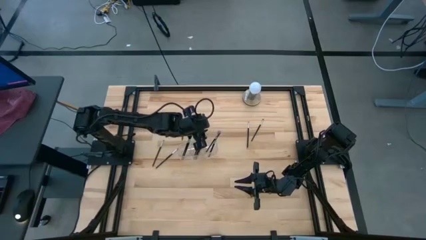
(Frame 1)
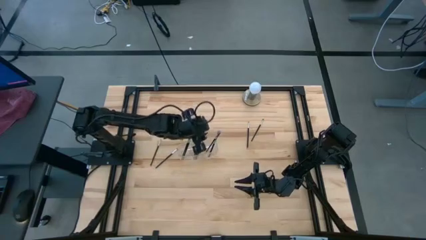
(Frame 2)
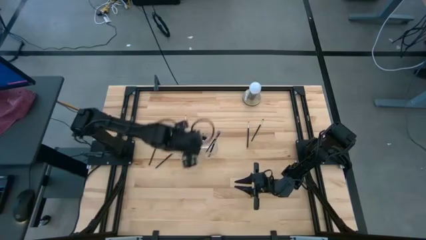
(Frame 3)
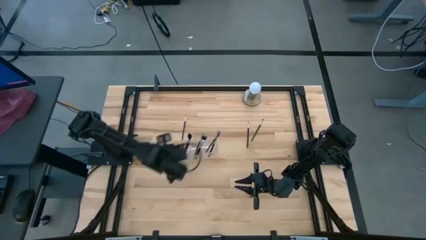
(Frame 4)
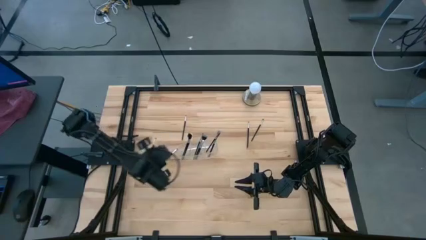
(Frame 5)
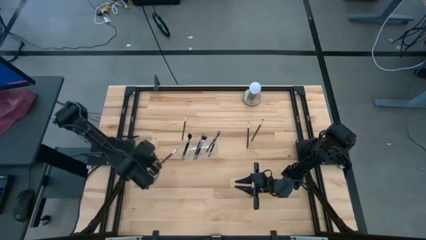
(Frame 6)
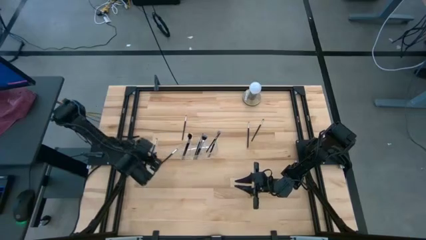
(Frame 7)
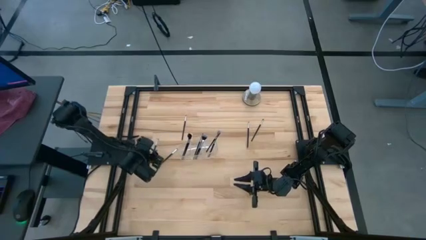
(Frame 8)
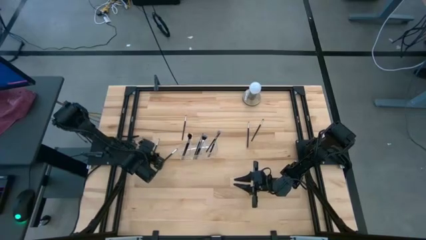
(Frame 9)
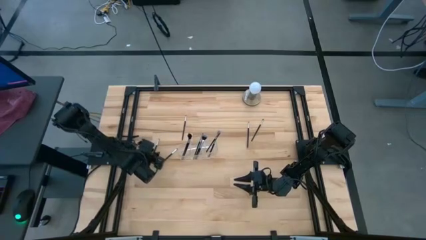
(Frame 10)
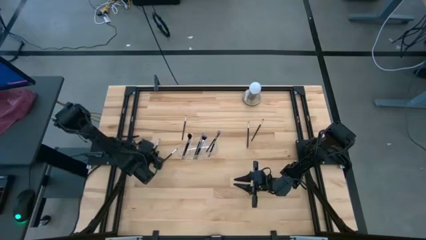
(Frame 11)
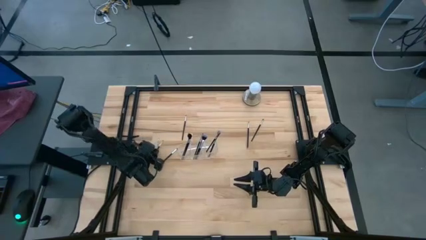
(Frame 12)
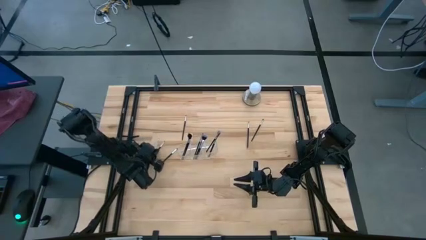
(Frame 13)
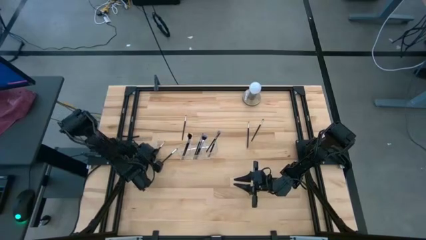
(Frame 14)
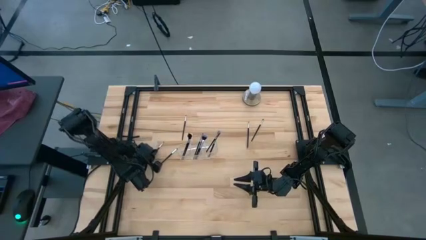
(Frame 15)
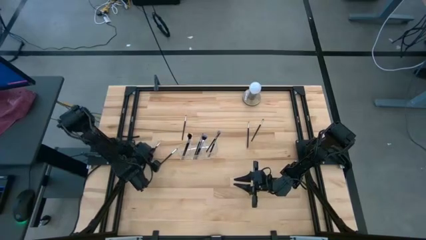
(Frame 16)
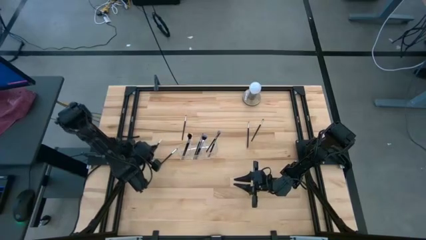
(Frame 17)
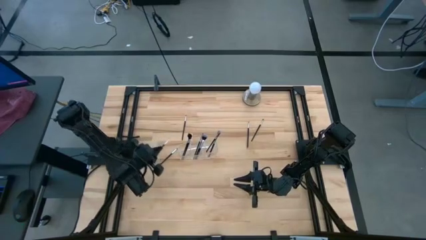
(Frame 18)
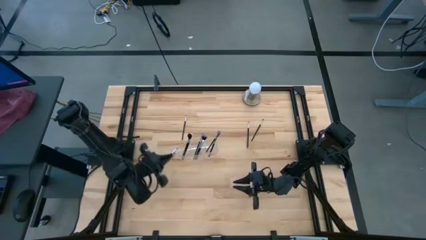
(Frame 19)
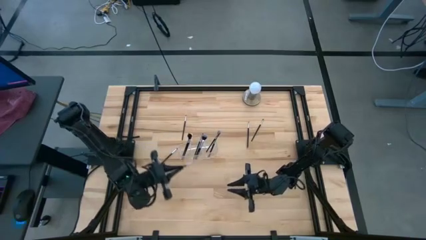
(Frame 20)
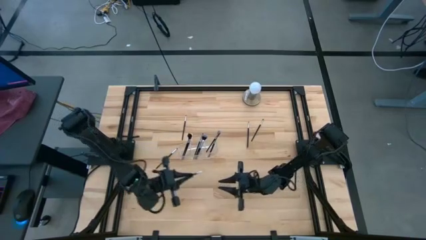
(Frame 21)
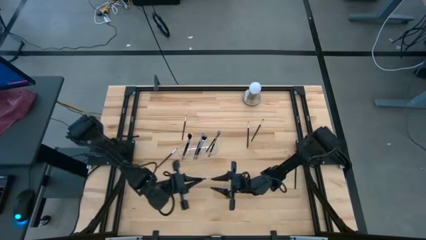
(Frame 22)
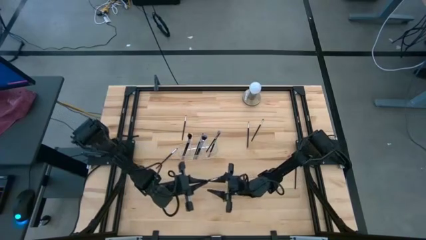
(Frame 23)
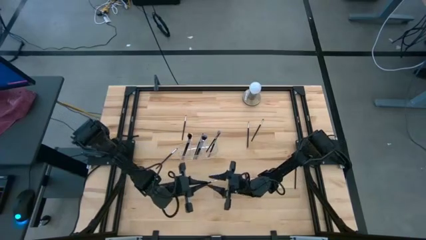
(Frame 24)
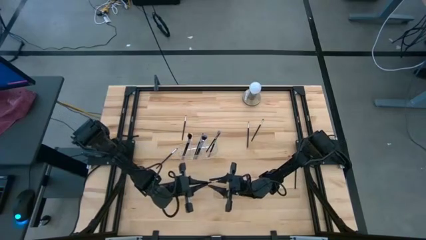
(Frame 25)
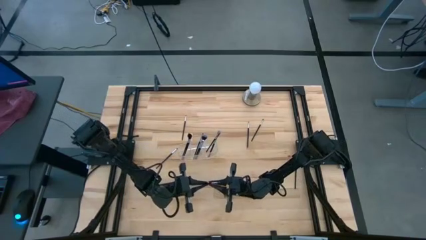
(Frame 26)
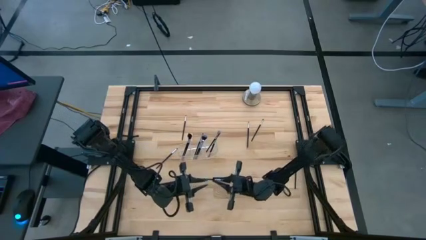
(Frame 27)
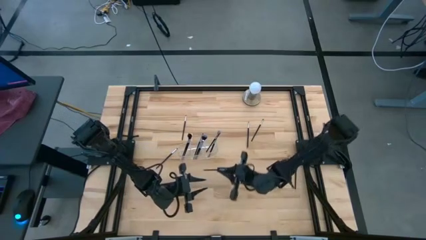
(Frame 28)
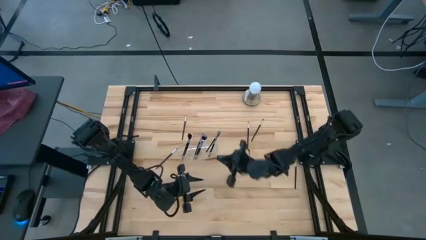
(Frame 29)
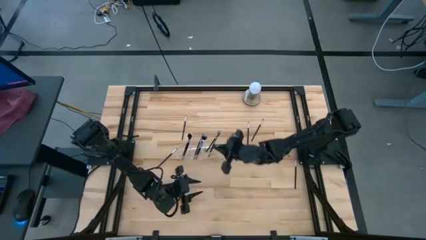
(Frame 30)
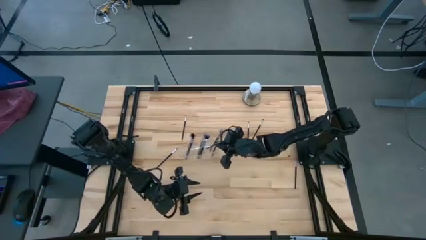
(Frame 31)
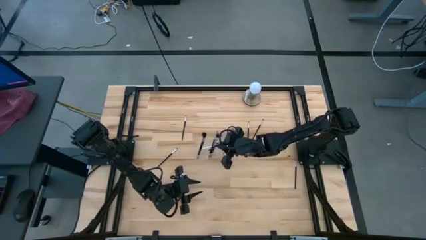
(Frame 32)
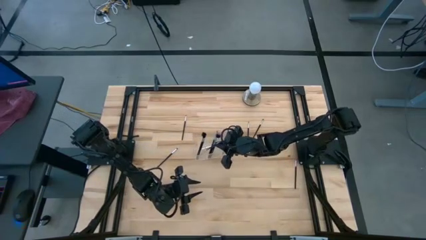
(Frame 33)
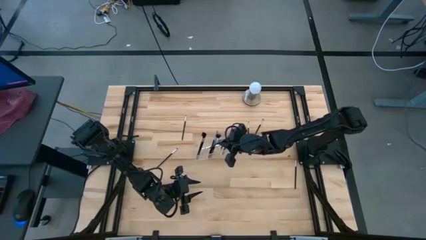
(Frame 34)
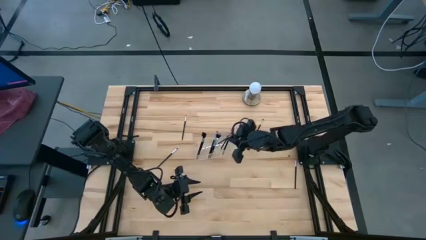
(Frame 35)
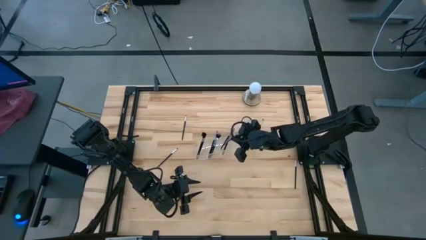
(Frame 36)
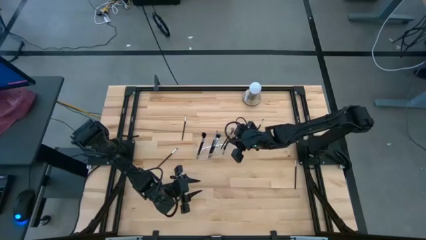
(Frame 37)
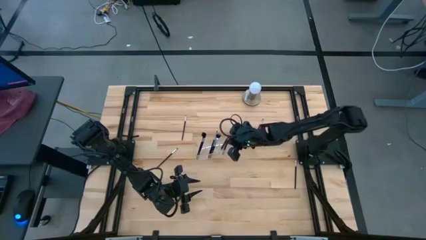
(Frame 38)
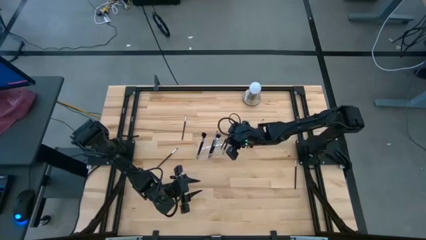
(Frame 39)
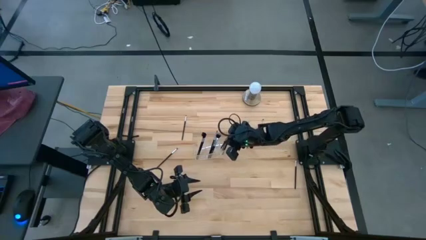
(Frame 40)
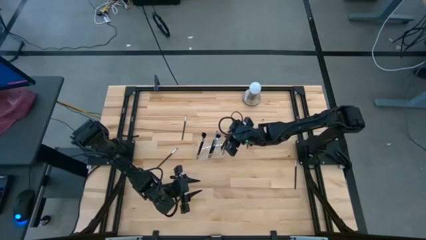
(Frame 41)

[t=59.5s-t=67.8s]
Task: Put items in baskets/containers
Put the eyeshadow brush into the transparent organizer

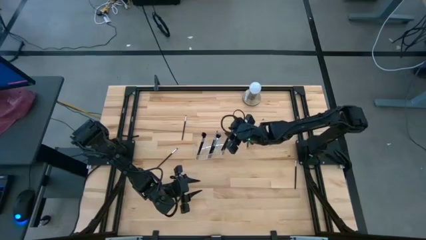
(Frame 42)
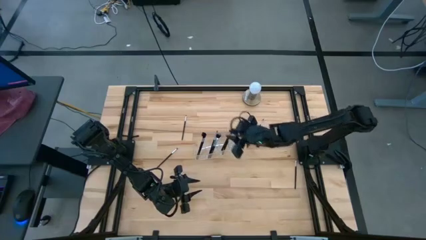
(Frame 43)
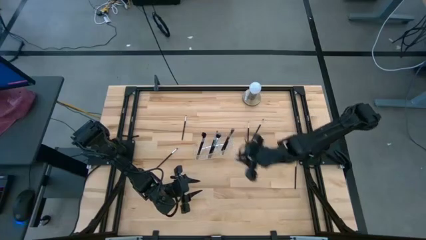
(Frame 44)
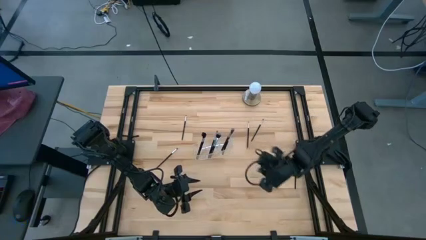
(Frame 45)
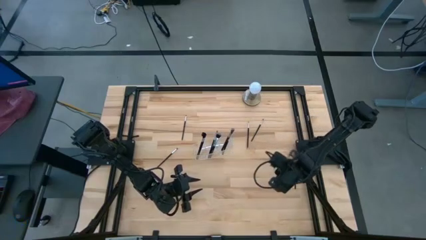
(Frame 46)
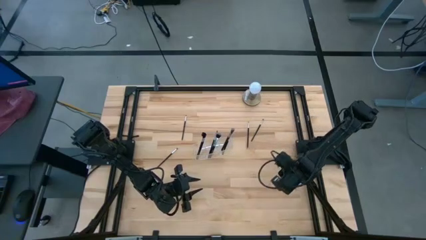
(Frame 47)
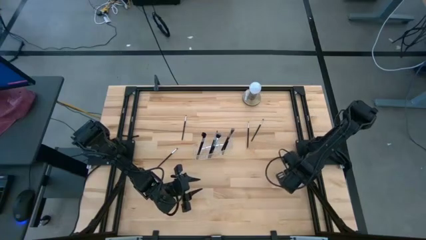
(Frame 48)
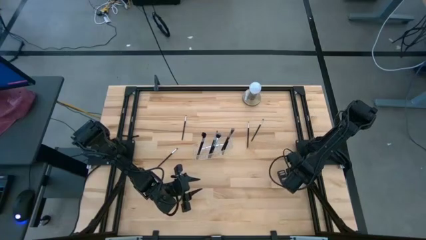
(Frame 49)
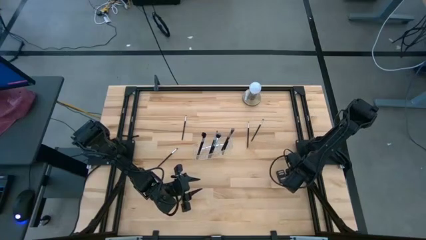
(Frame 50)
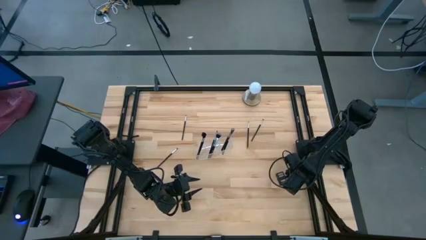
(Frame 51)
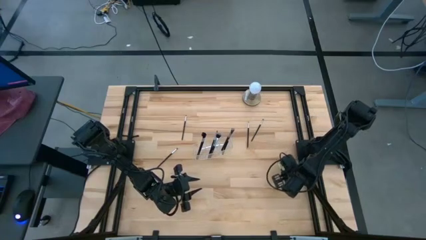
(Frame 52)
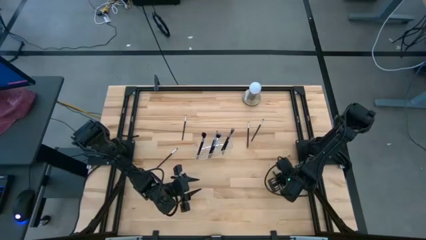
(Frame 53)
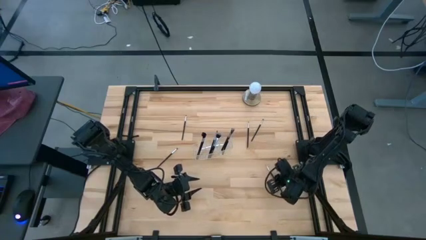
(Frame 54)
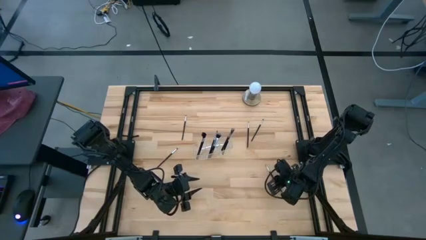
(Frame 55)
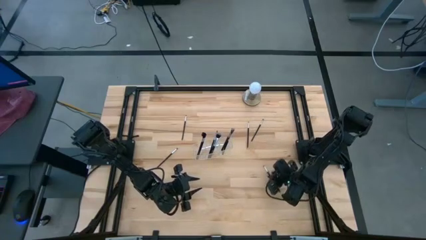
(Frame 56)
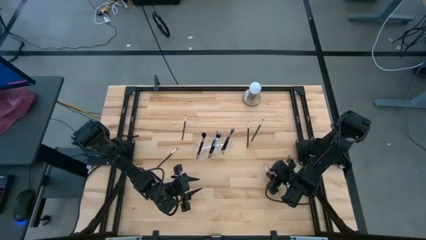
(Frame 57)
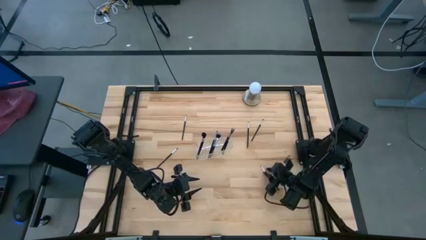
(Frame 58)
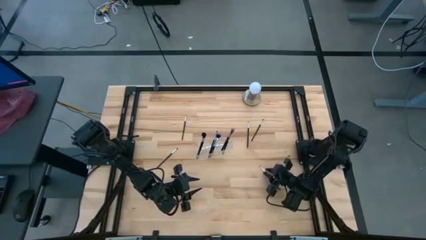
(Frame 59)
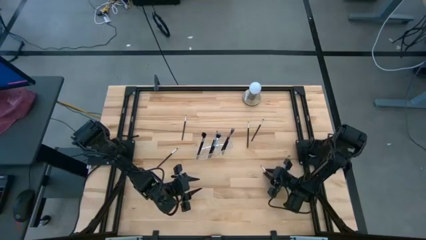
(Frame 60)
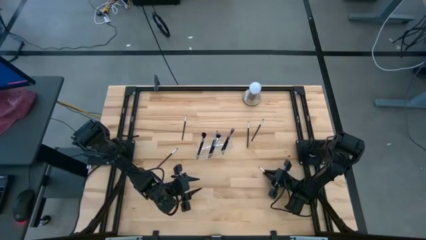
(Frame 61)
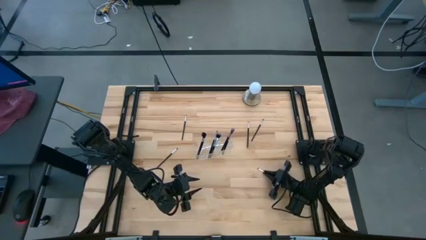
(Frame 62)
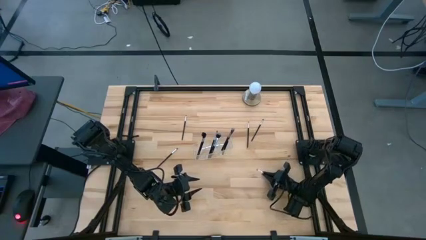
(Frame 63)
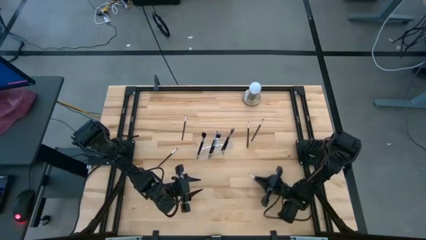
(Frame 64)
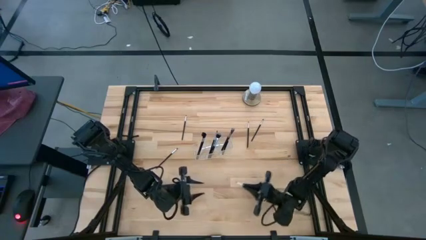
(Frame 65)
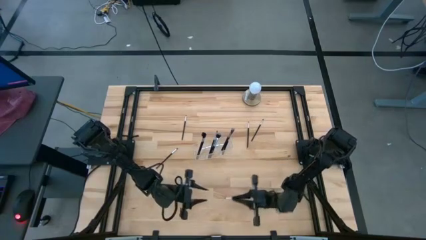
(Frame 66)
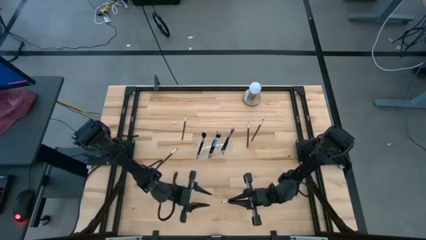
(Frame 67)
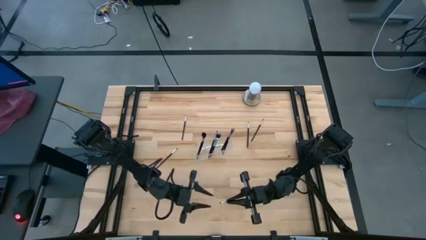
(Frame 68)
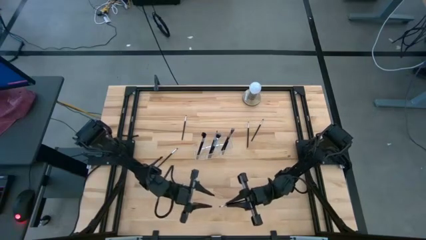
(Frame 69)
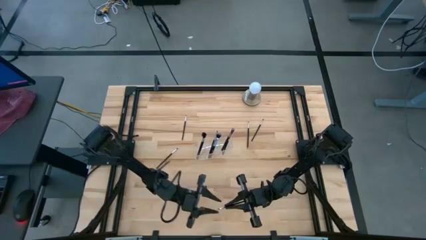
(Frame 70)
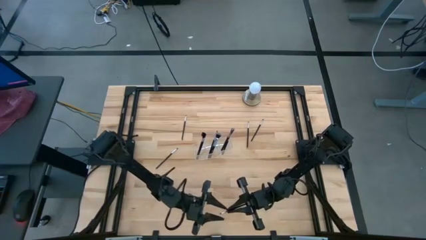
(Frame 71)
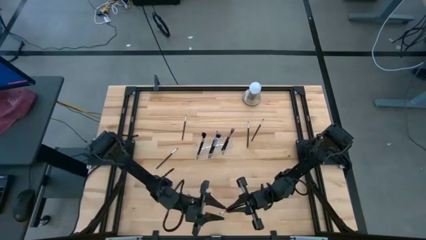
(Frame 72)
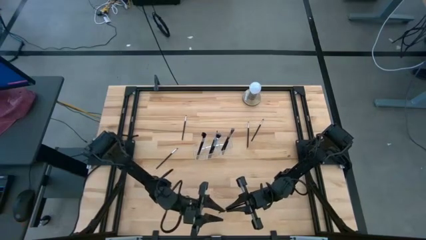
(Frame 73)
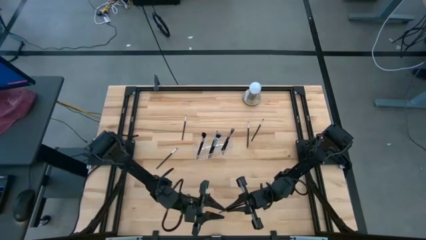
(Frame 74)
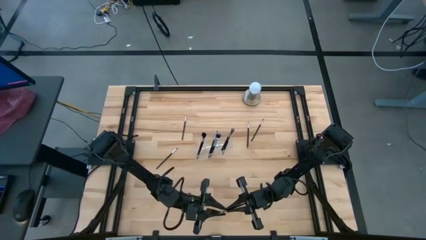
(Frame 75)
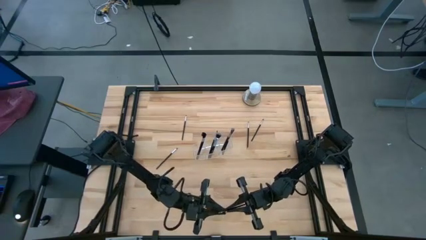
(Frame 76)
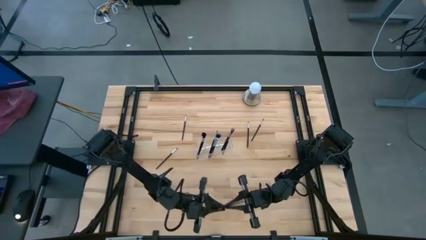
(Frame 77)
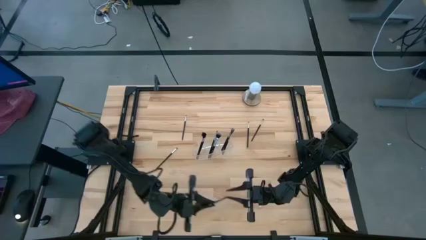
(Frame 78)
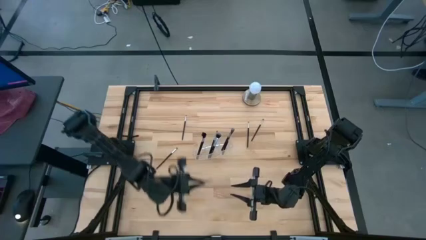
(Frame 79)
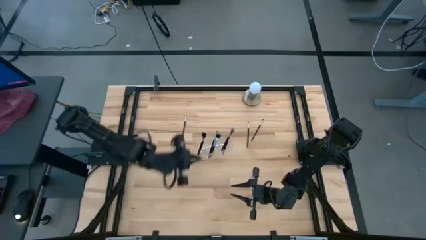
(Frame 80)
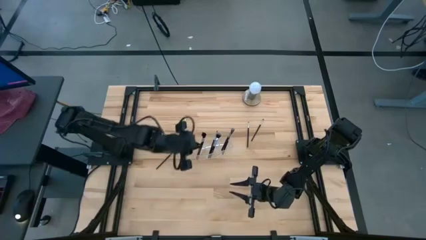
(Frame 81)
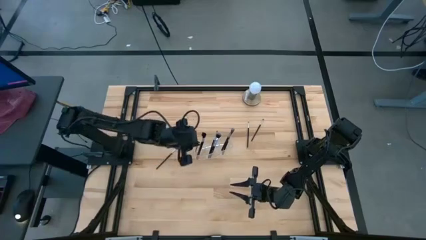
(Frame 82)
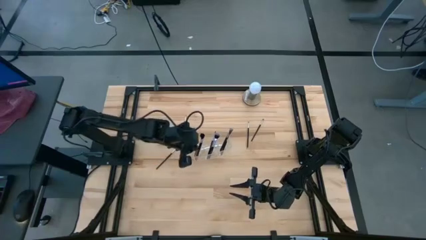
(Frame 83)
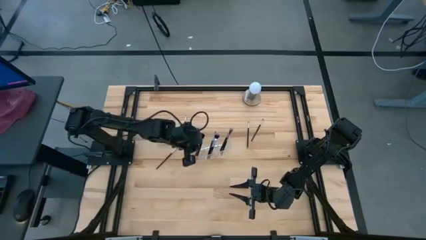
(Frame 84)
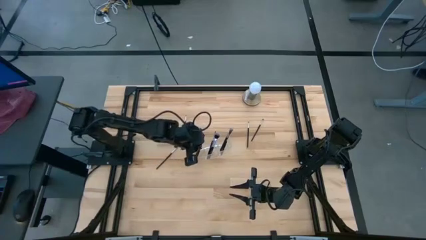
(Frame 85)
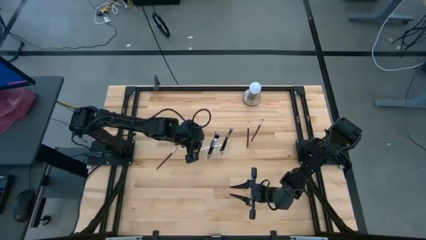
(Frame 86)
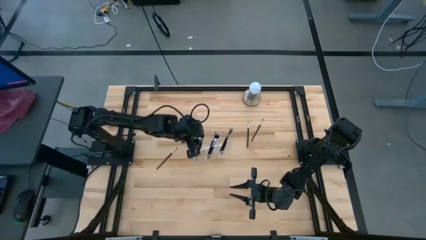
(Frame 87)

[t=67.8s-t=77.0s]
Put the eyeshadow brush into the transparent organizer
